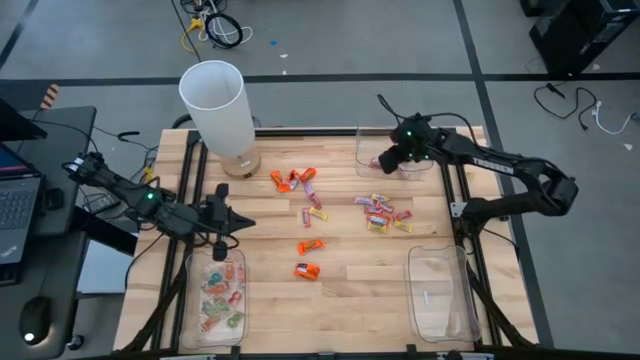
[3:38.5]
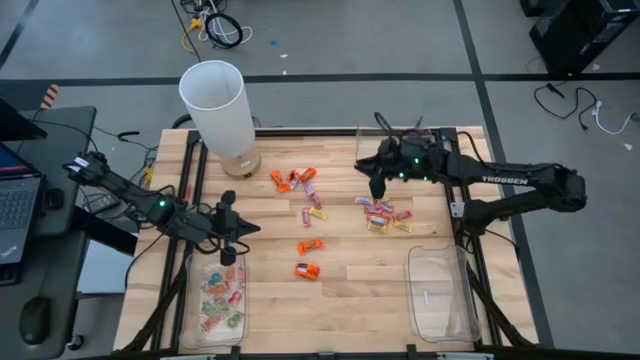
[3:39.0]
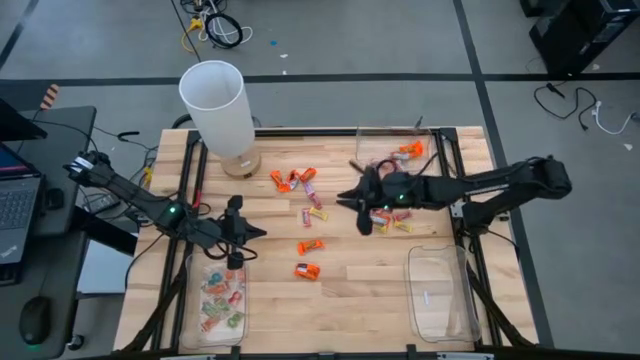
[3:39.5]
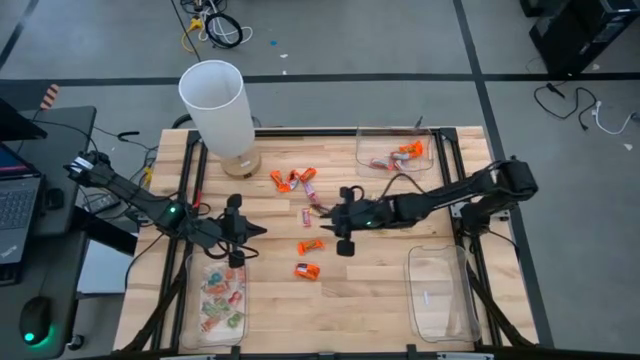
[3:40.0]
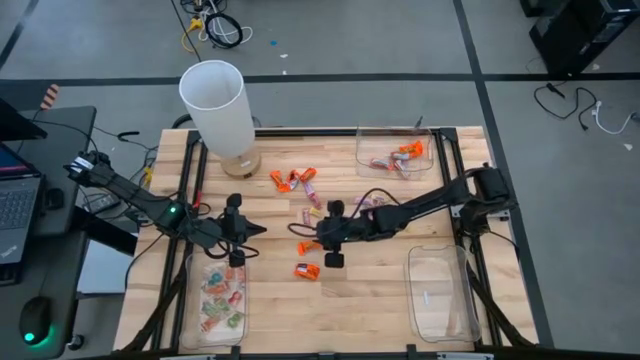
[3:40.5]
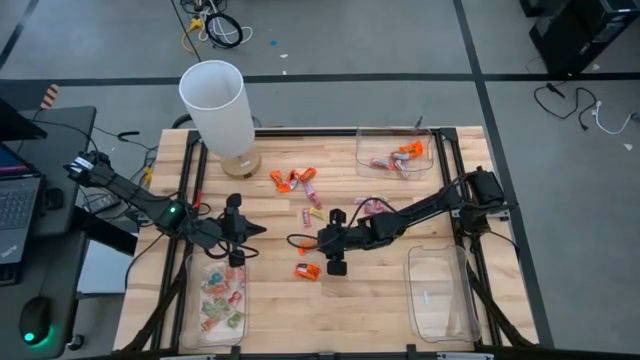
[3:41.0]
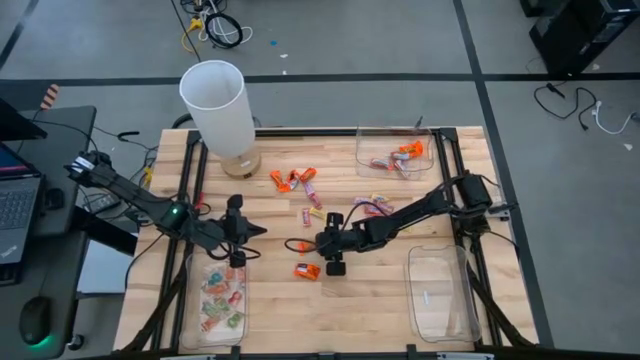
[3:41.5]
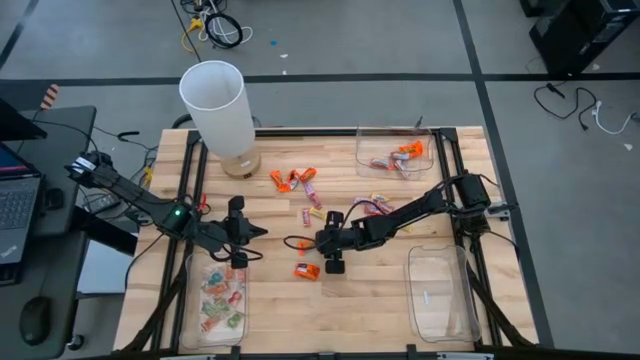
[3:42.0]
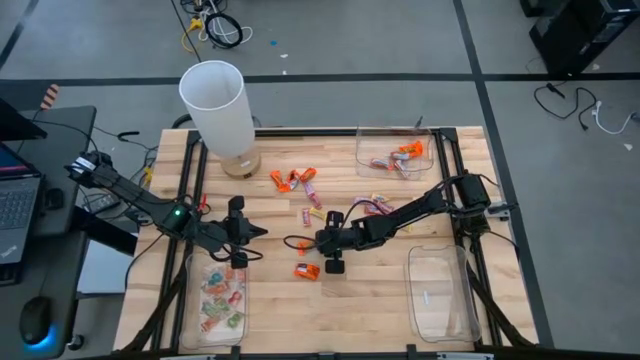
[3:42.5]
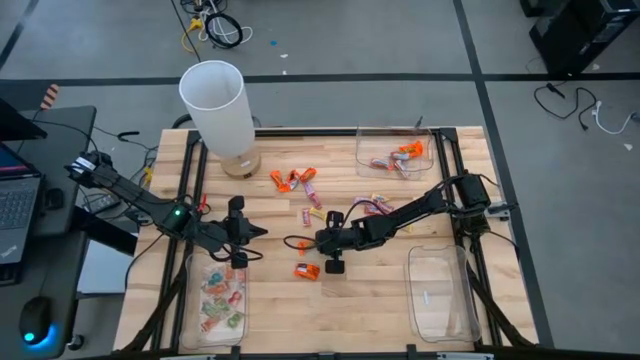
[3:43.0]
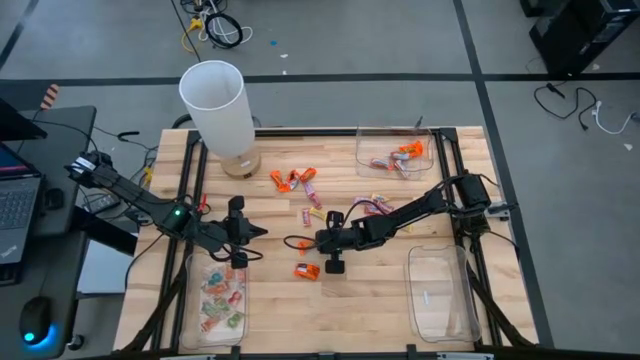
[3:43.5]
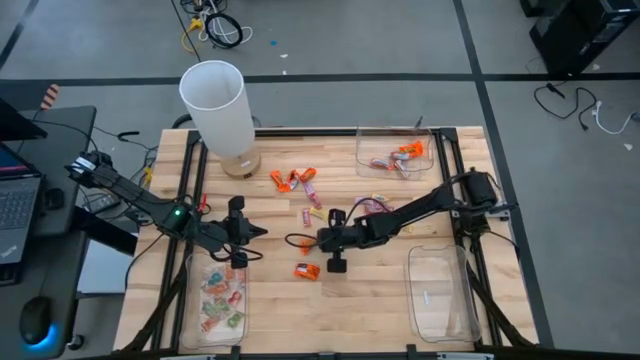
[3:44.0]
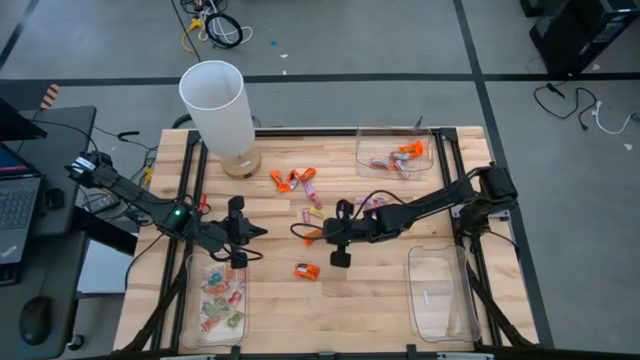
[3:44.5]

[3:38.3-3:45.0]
Task: Sort candy
Put the large orange chocolate bar into the top right transparent bin

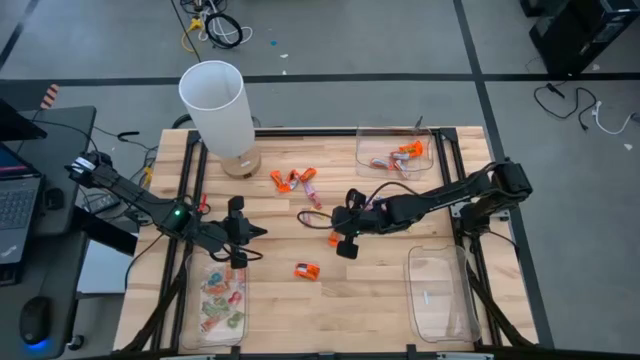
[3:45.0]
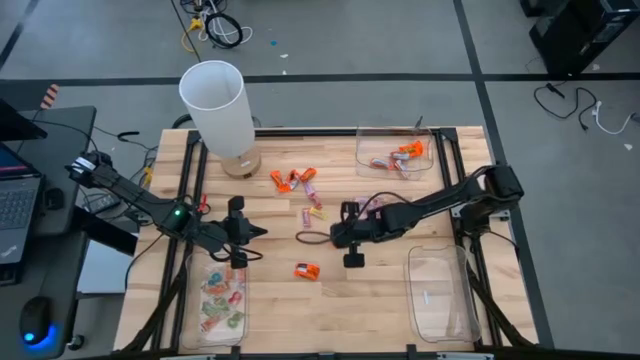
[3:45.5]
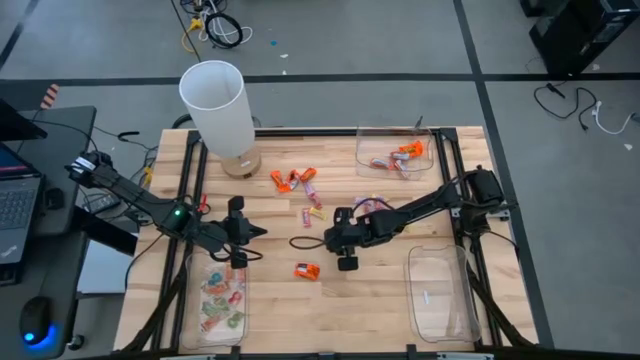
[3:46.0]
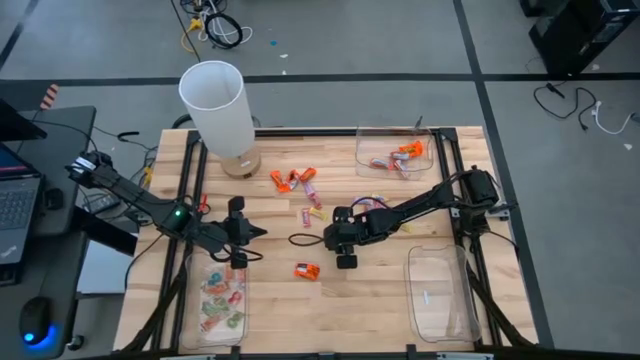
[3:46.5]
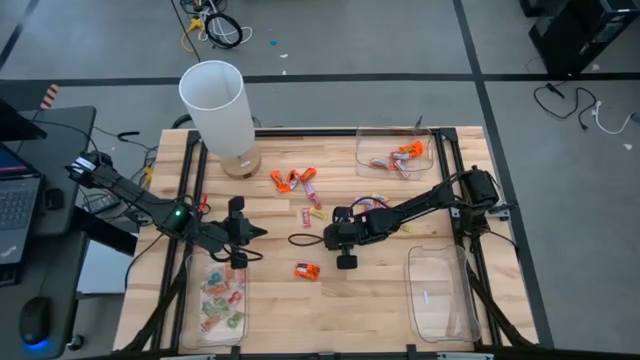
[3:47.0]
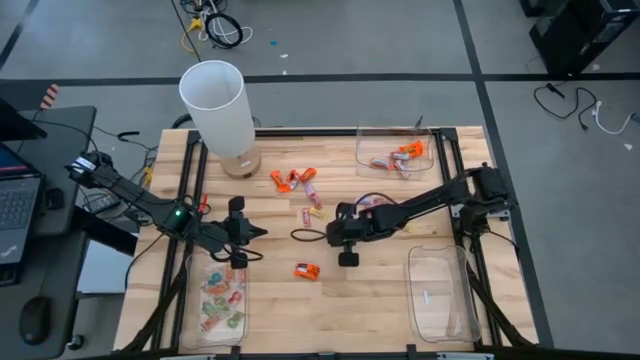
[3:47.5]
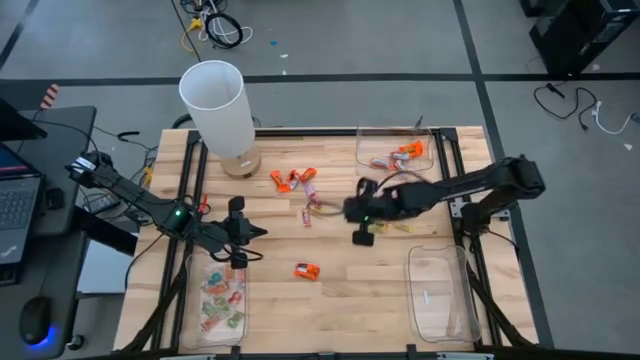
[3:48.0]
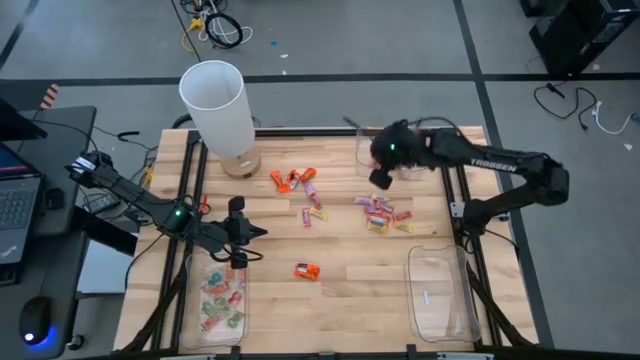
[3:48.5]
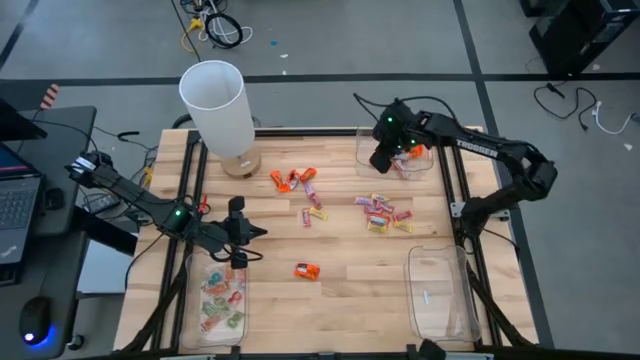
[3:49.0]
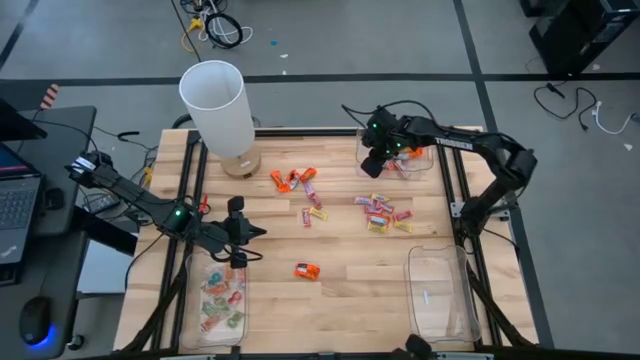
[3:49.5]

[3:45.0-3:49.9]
Put the large orange chocolate bar into the top right transparent bin

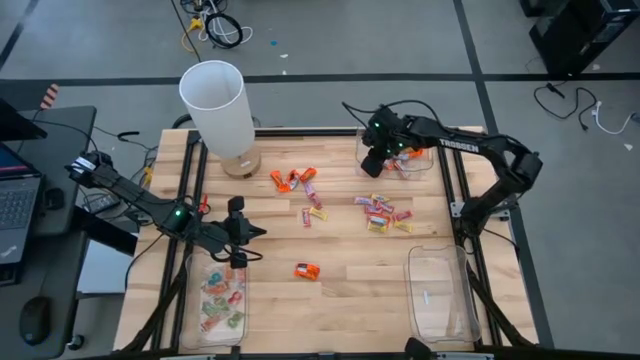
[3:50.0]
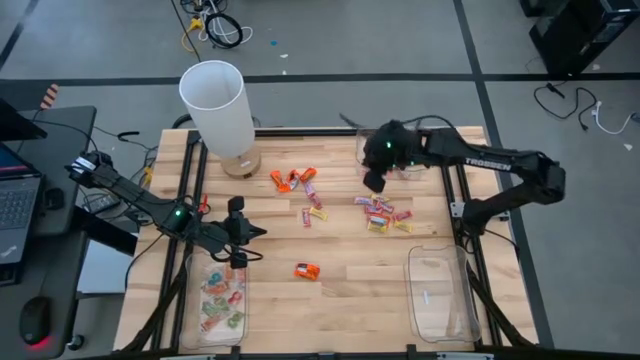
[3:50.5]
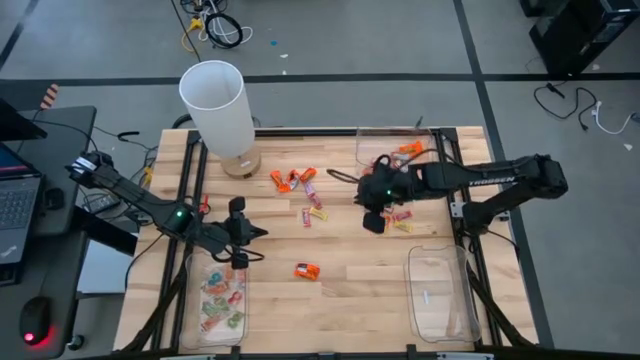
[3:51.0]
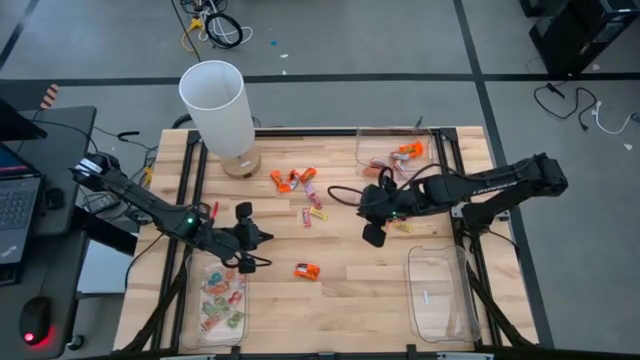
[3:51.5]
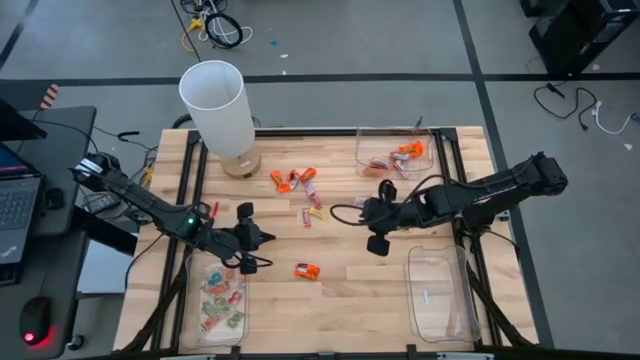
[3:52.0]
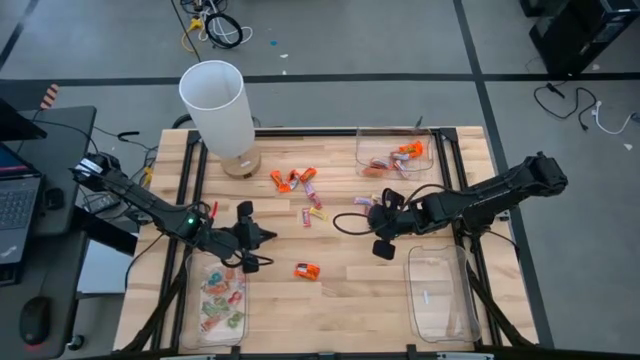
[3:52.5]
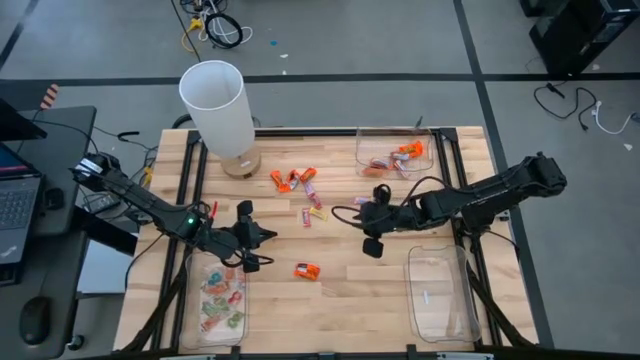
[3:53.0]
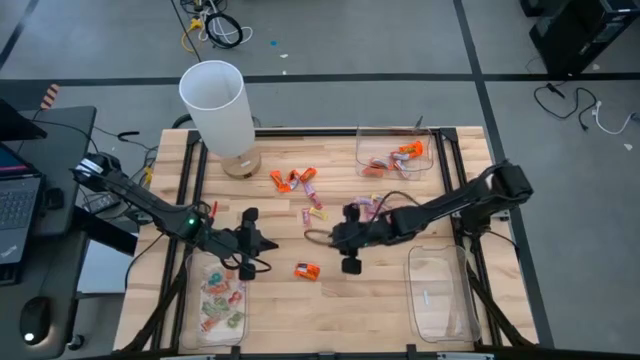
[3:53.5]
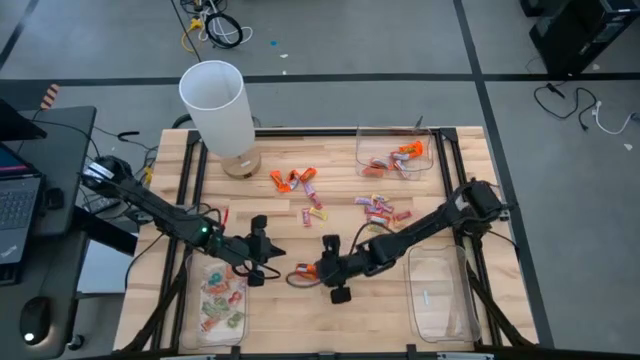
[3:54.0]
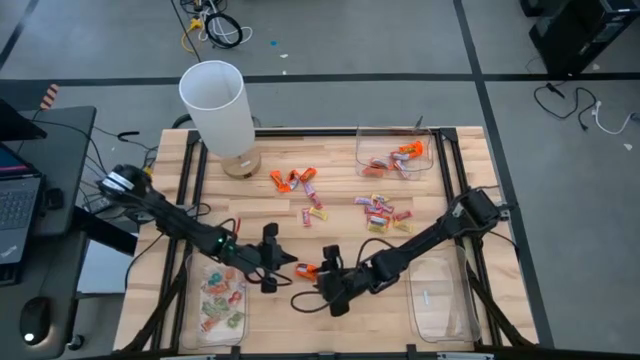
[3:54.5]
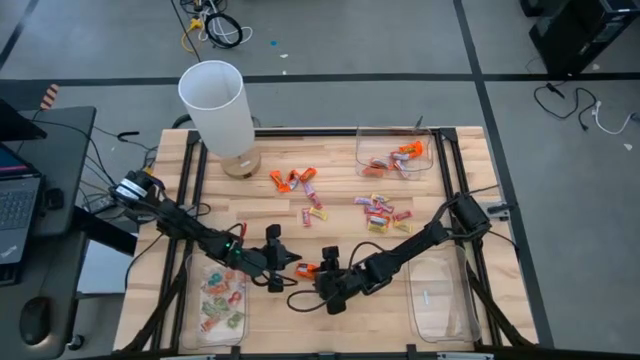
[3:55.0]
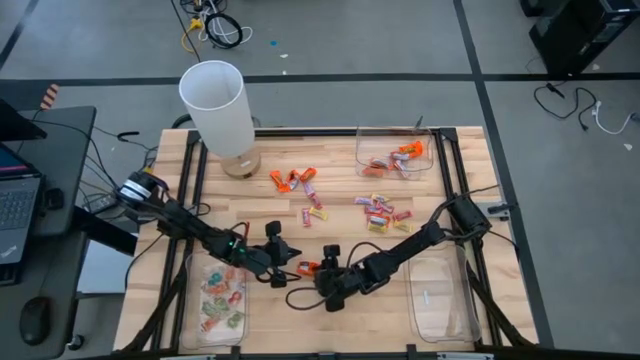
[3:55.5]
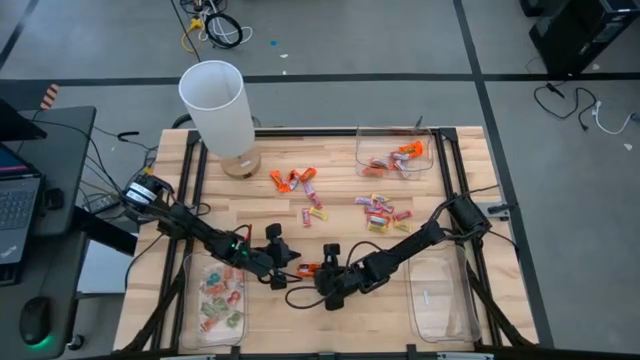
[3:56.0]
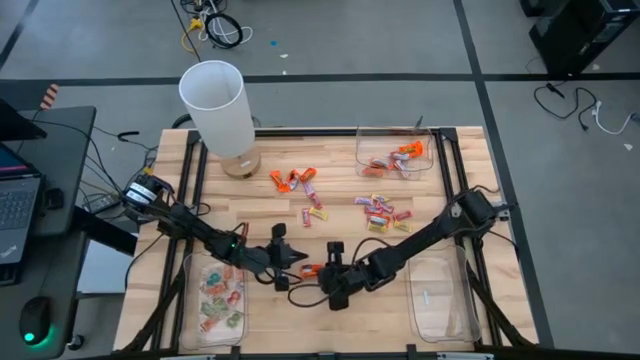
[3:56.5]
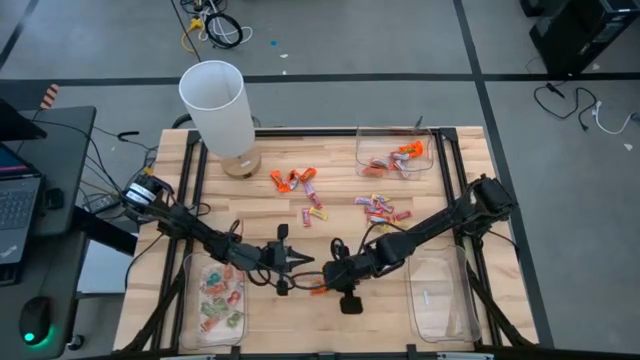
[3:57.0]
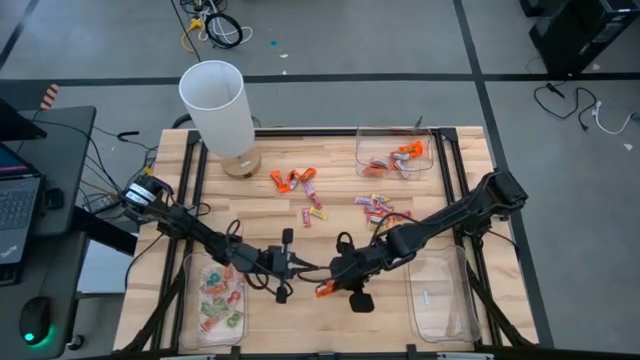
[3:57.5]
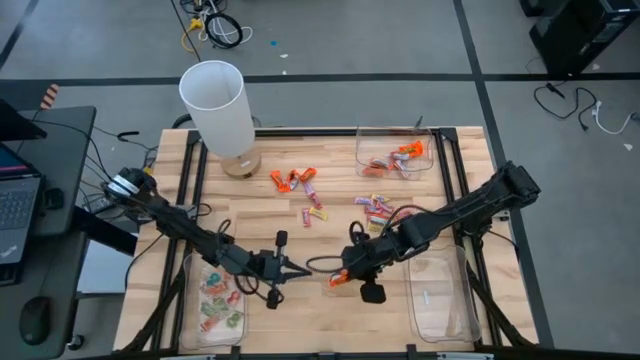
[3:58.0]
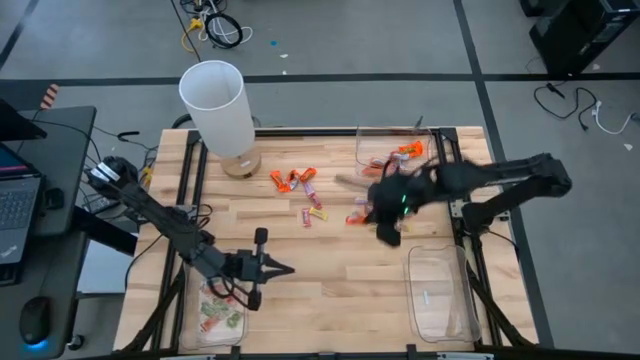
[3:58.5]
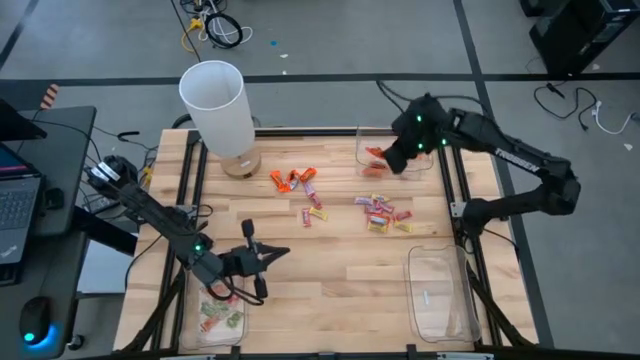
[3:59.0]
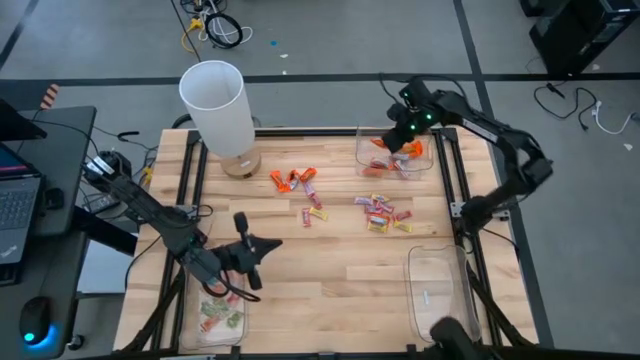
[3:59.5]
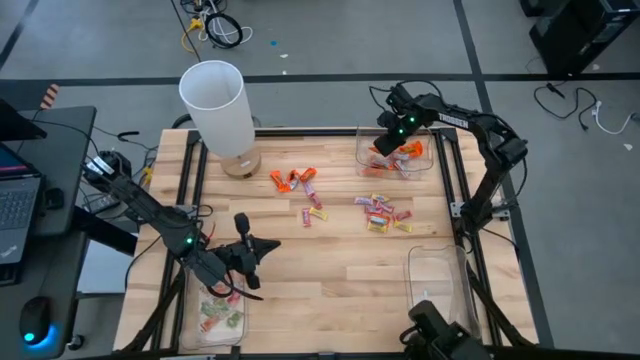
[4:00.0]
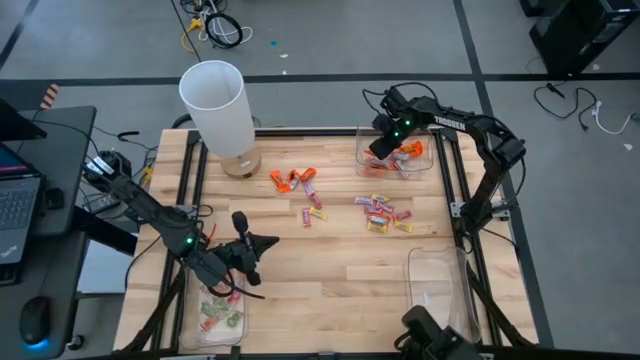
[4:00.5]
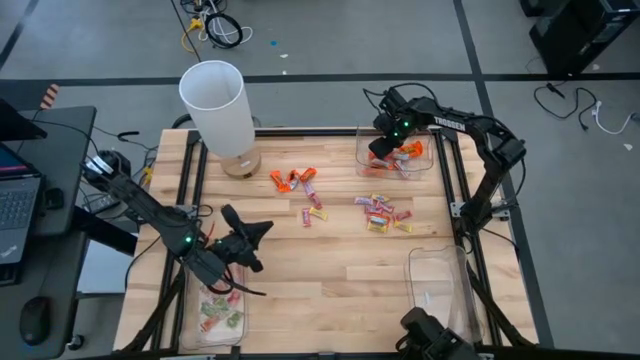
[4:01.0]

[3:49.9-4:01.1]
Put the small orange chocolate bar into the top right transparent bin
